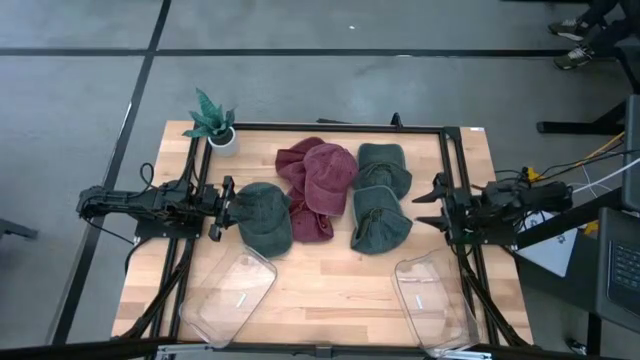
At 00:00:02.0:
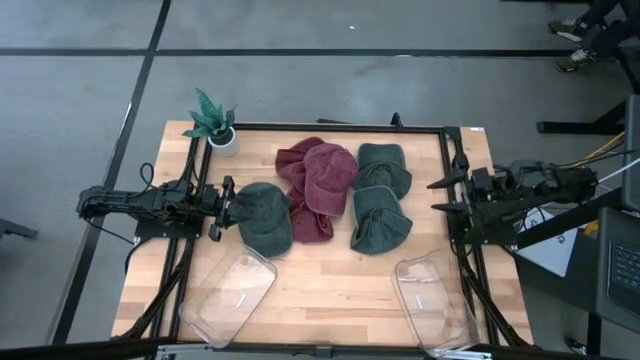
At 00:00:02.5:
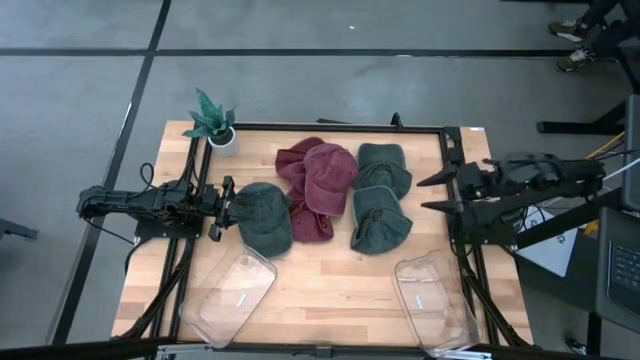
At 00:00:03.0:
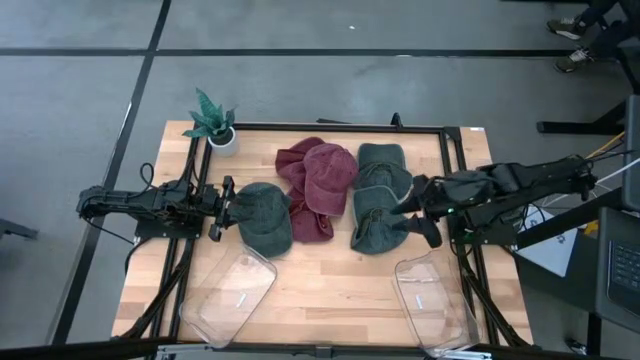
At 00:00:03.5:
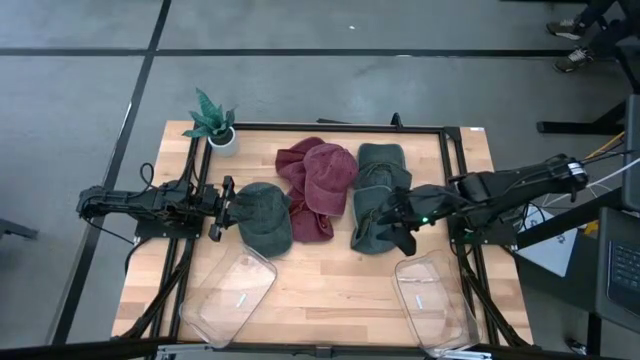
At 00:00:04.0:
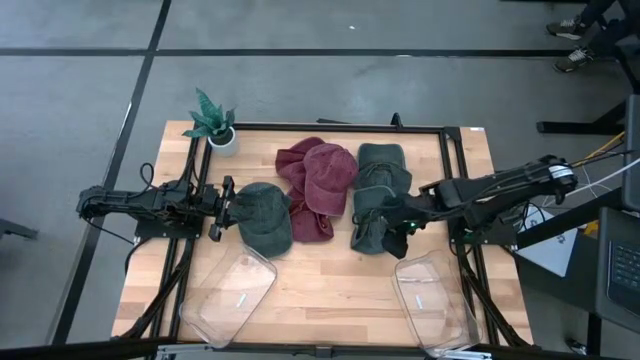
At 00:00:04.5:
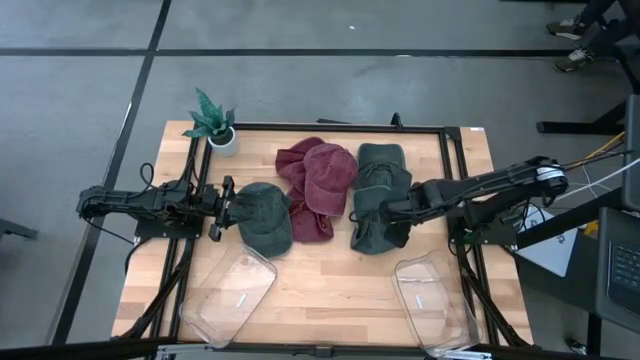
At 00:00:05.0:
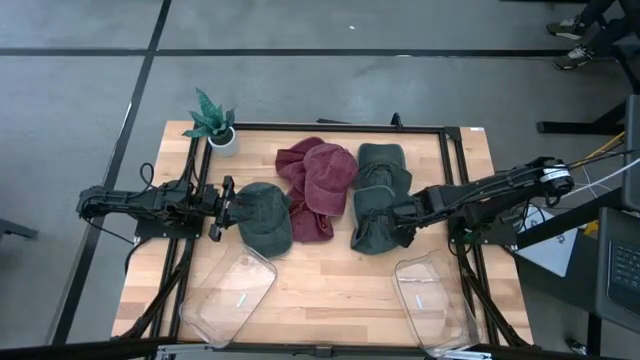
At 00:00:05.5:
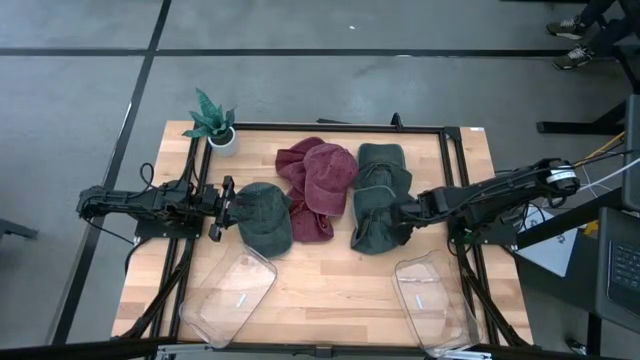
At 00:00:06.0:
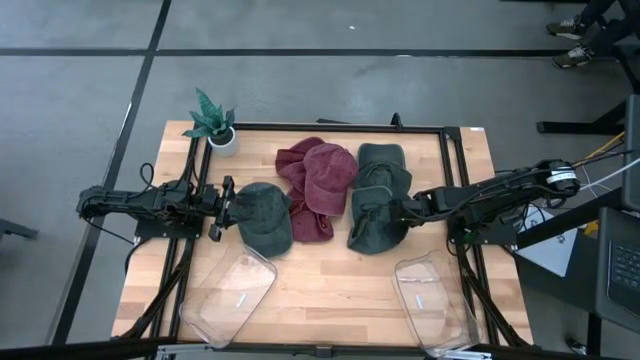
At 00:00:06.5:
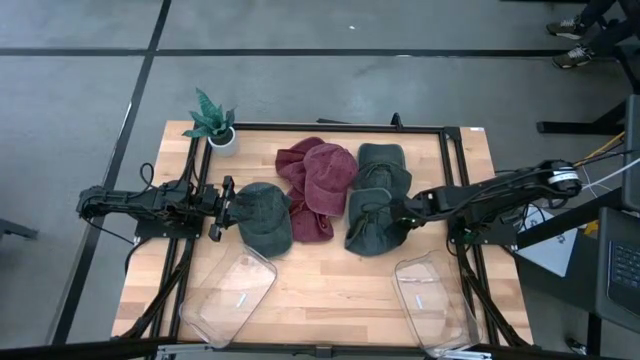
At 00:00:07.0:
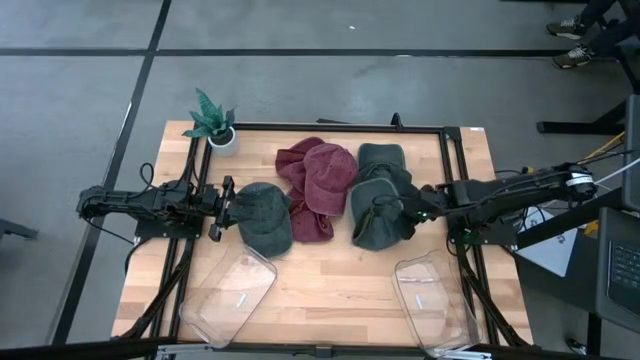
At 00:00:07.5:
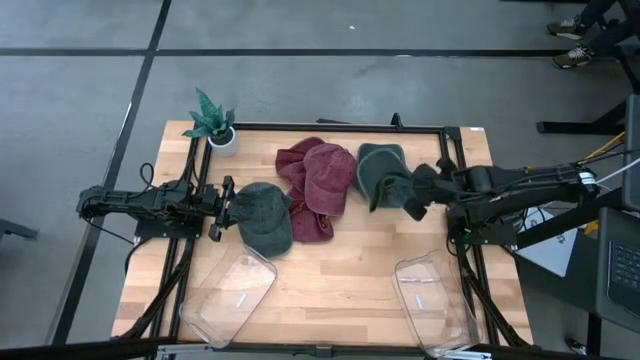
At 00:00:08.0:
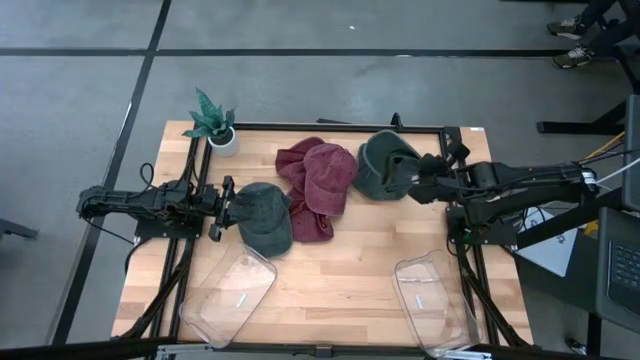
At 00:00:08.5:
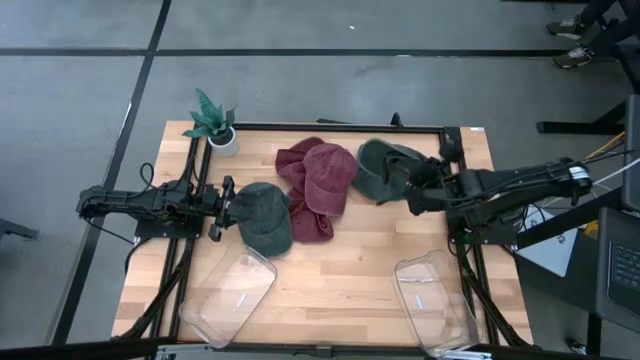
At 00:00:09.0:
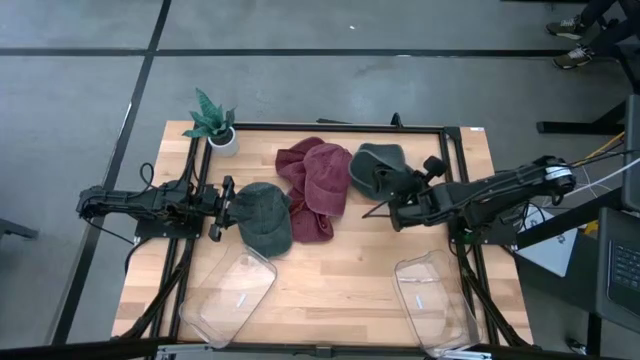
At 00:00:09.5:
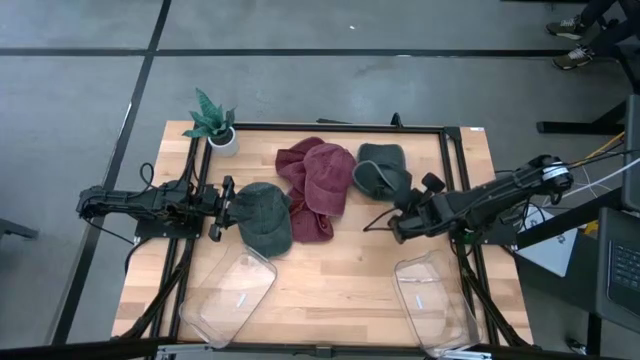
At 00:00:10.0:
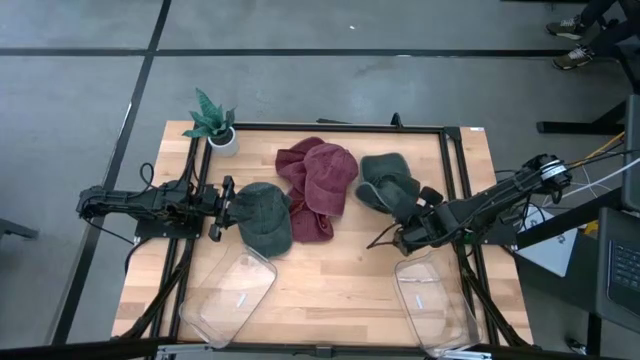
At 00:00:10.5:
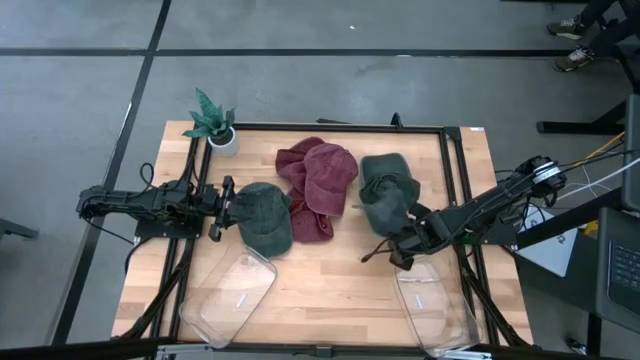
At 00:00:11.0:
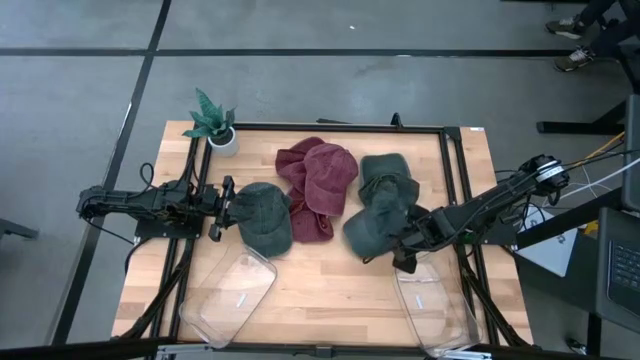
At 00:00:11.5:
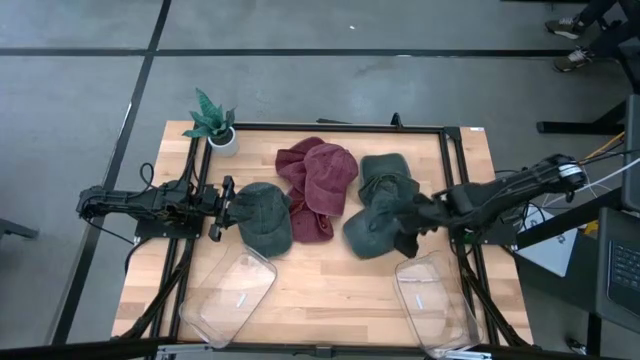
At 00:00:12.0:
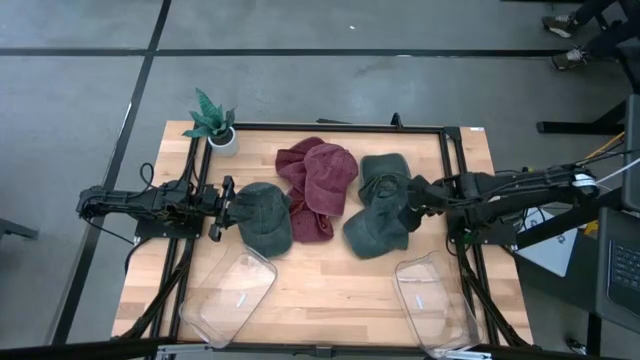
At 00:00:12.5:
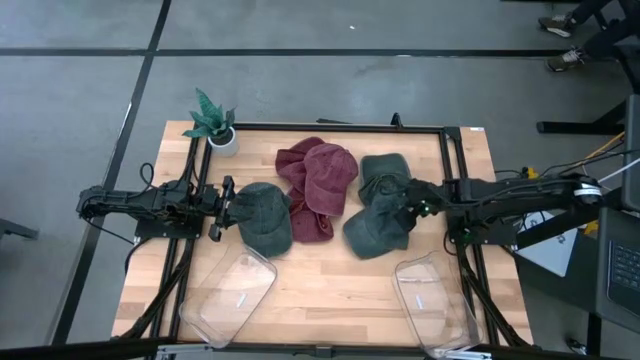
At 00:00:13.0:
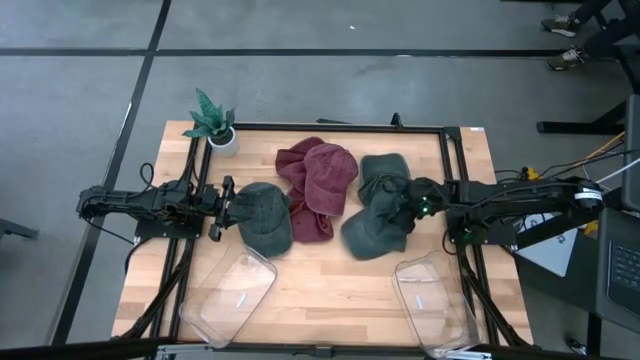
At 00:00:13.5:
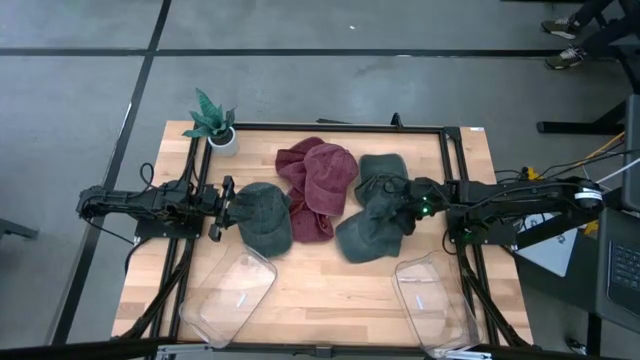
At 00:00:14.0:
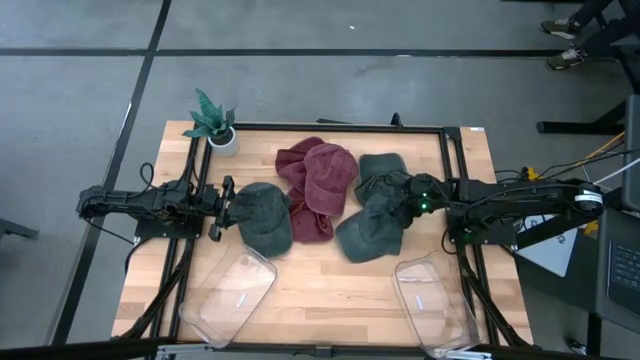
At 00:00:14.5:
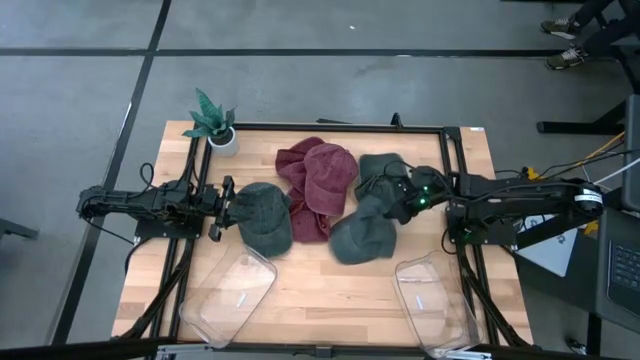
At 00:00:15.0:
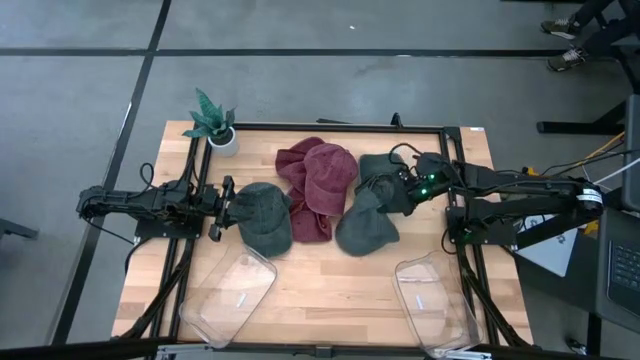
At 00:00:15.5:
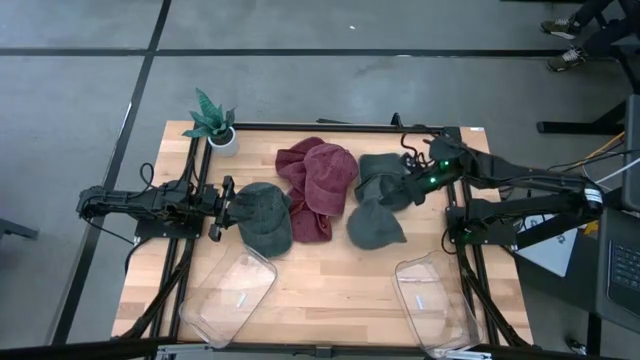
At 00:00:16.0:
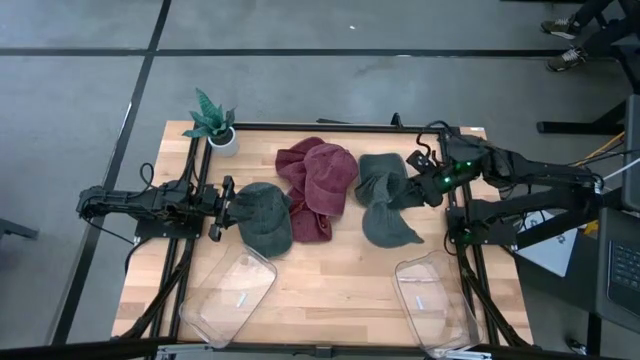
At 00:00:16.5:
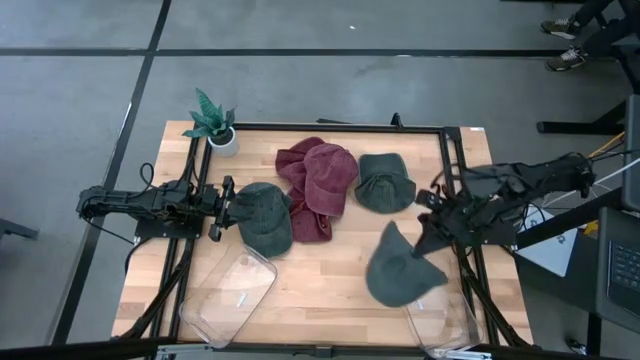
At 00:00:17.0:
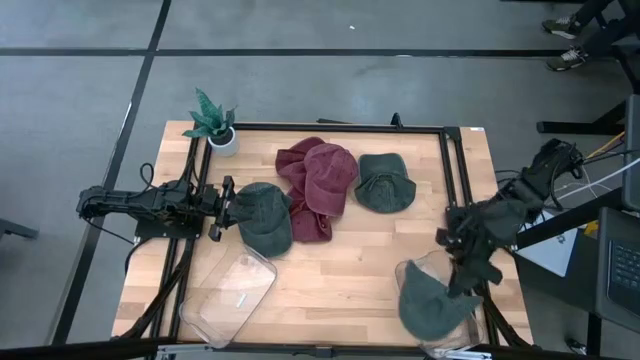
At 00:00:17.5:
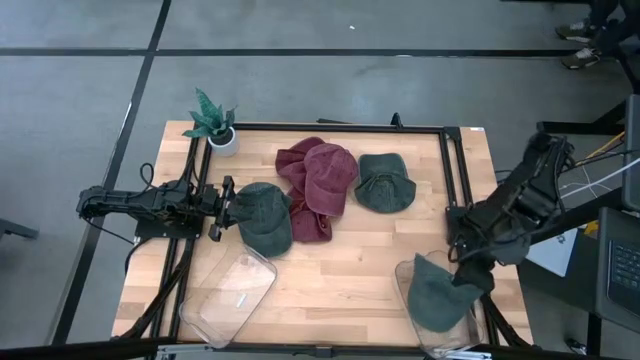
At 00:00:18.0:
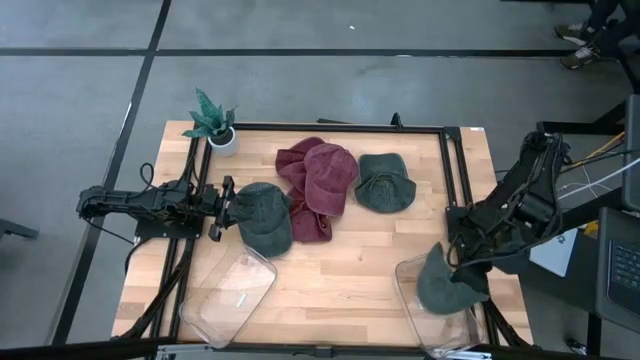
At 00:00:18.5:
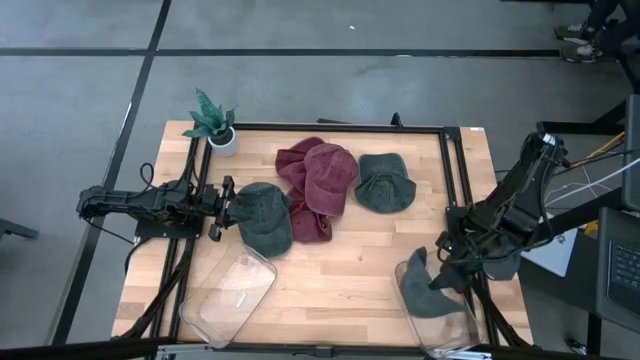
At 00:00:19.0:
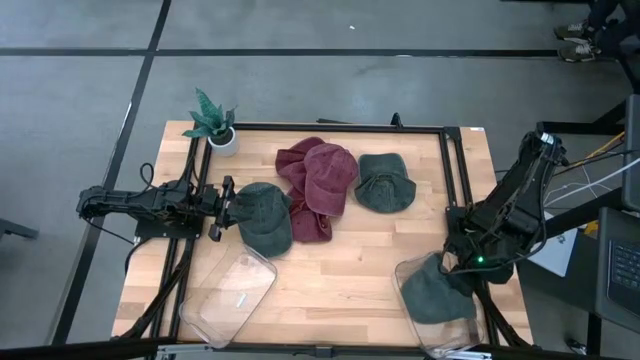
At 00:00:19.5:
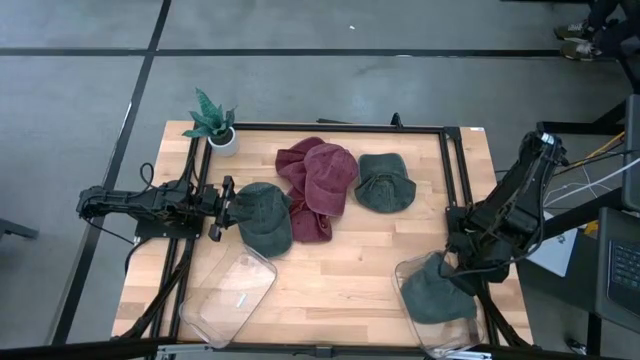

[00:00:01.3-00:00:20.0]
Task: Pick & Place hat
Put the bottom right green cap into the right transparent bin

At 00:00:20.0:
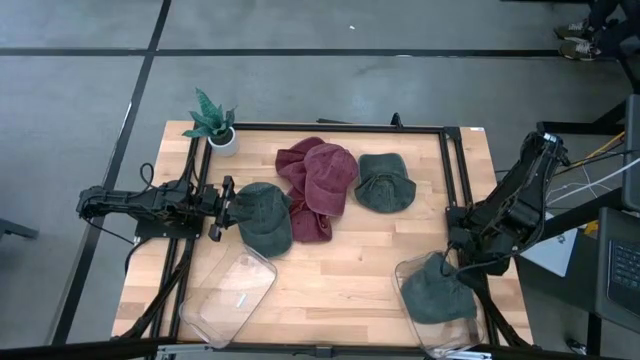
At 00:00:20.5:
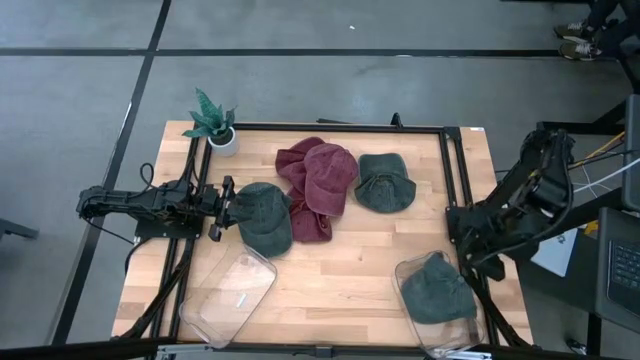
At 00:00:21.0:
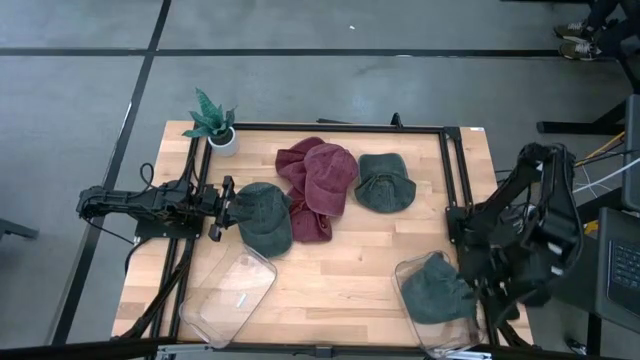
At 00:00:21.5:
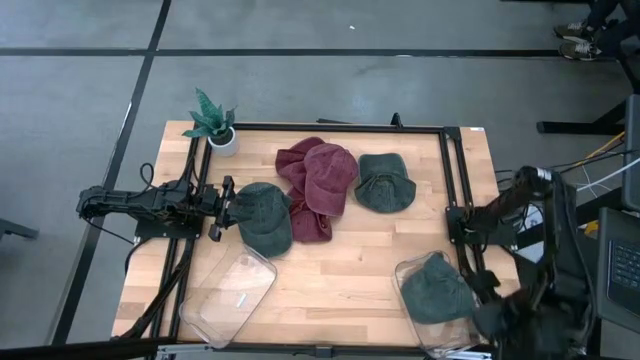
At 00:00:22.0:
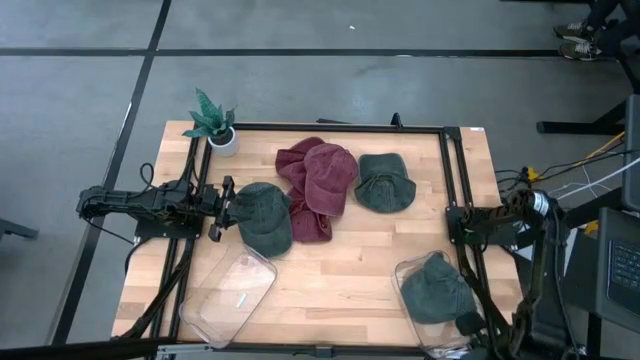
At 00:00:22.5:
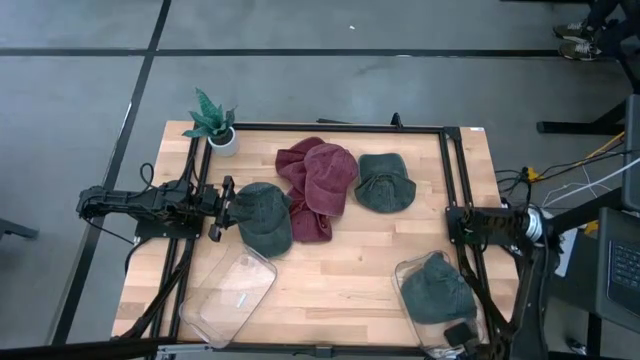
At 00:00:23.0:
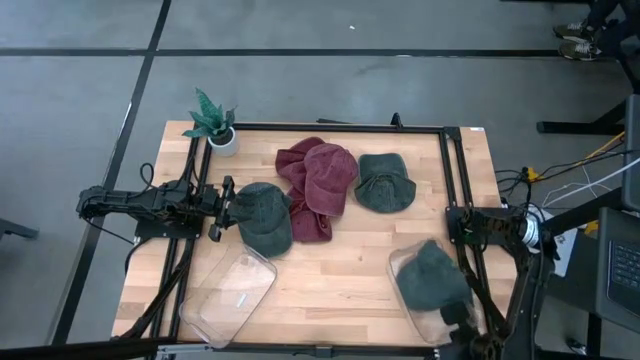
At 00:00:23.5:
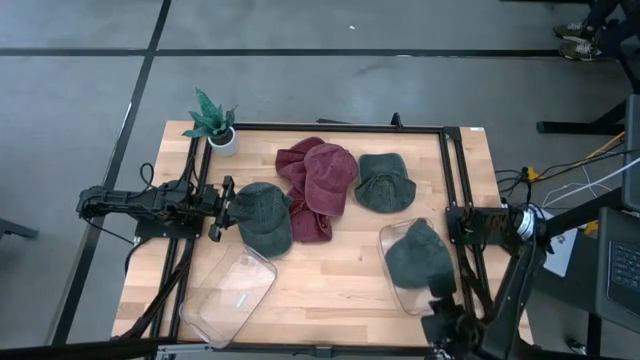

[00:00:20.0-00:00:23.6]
Adjust the right transparent bin
